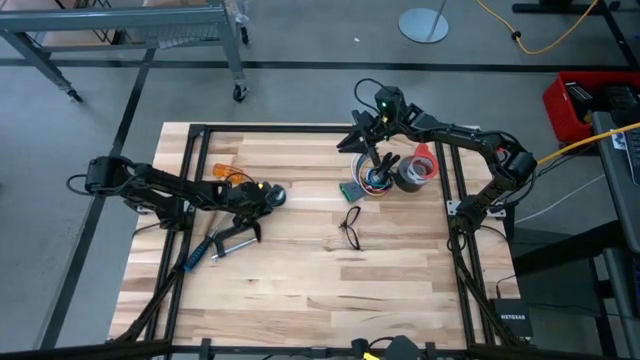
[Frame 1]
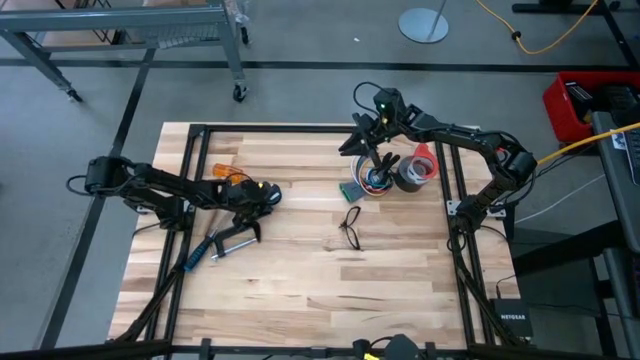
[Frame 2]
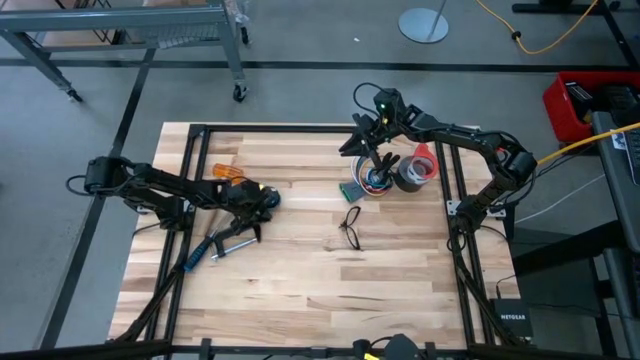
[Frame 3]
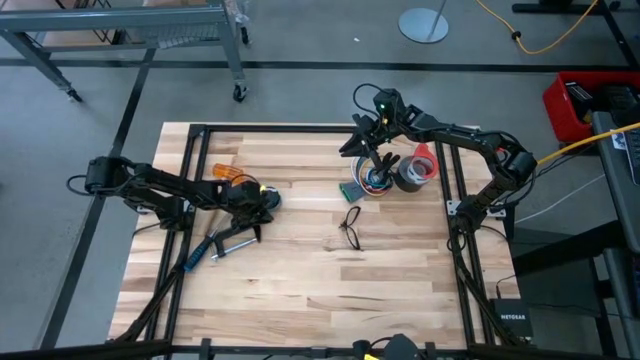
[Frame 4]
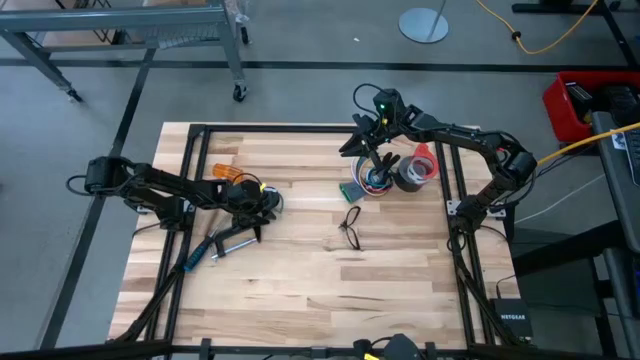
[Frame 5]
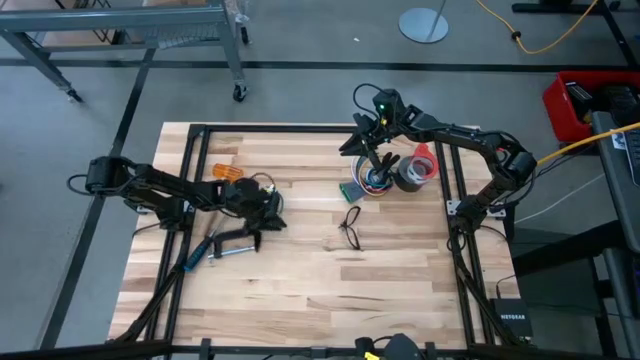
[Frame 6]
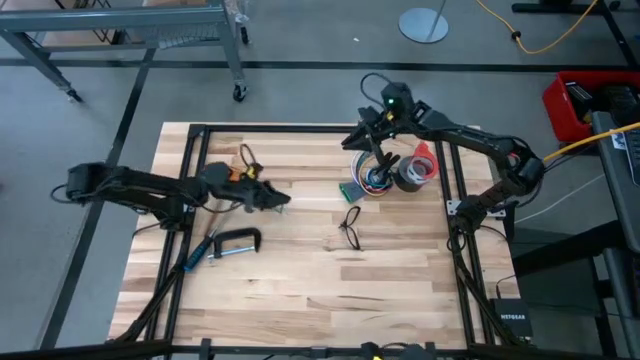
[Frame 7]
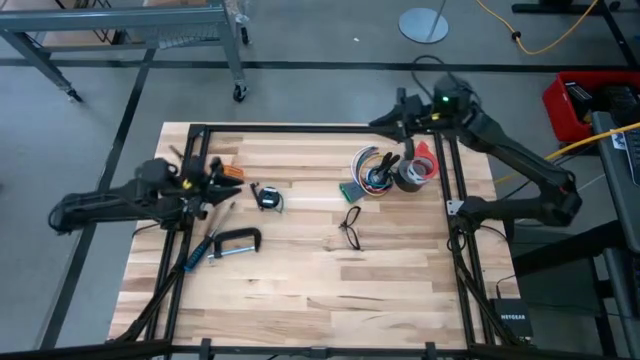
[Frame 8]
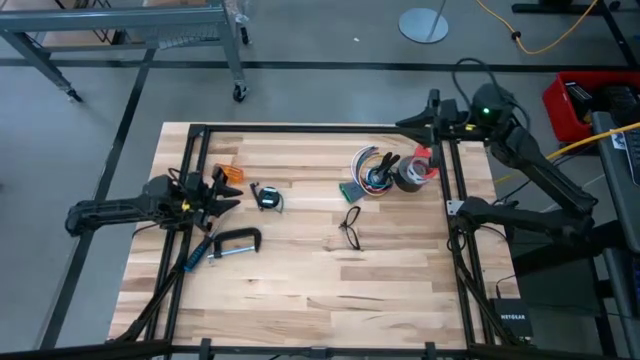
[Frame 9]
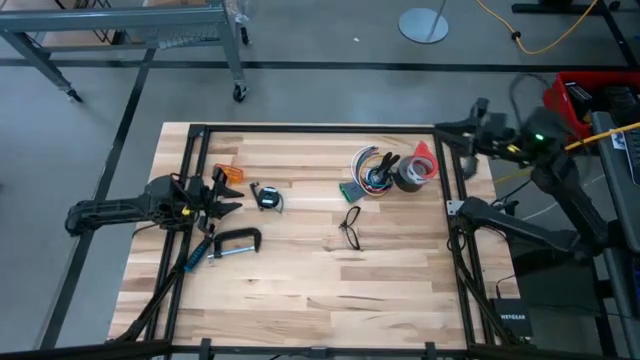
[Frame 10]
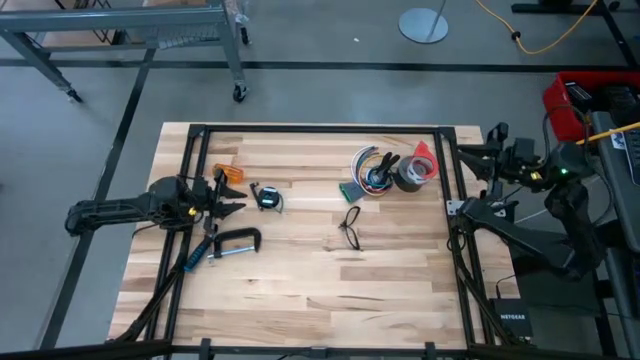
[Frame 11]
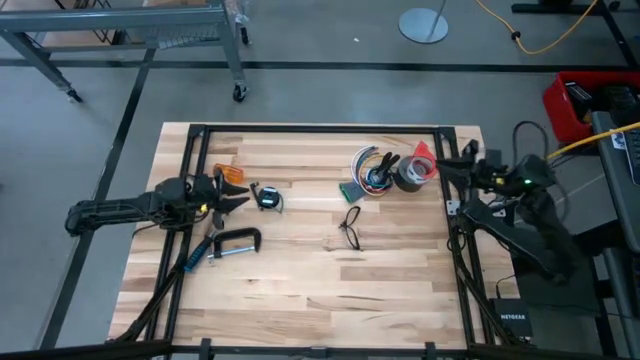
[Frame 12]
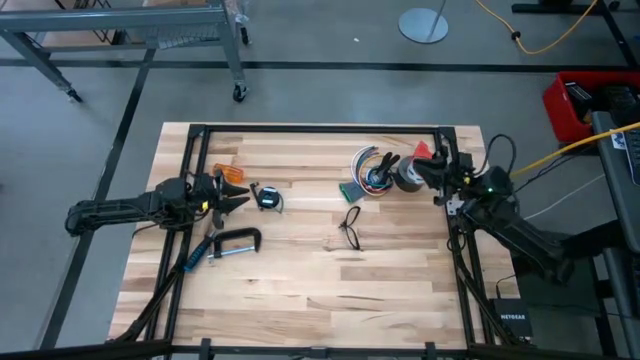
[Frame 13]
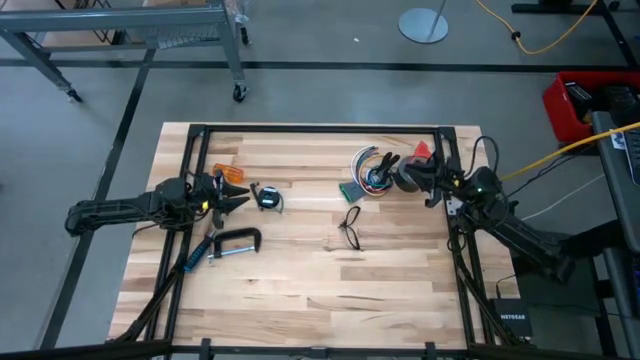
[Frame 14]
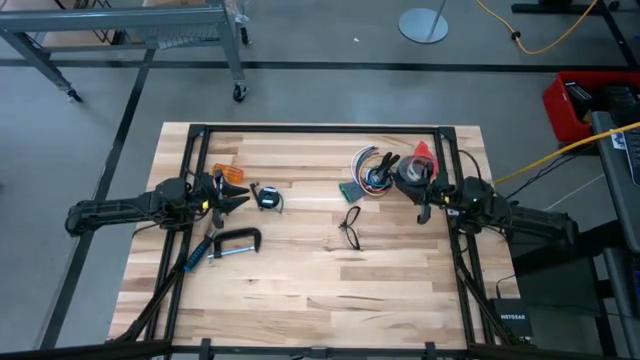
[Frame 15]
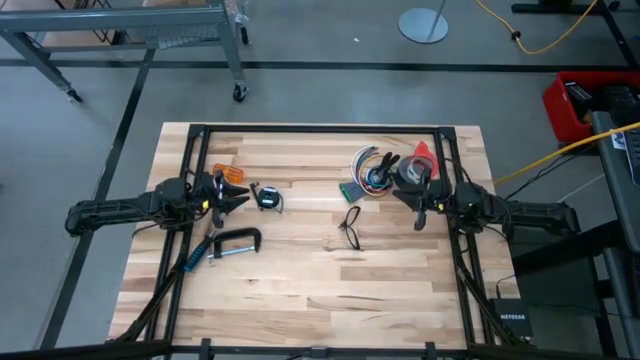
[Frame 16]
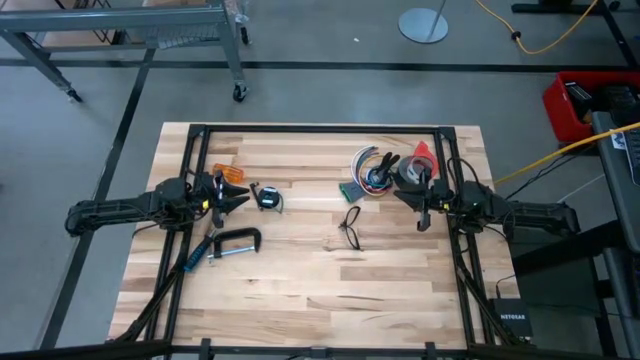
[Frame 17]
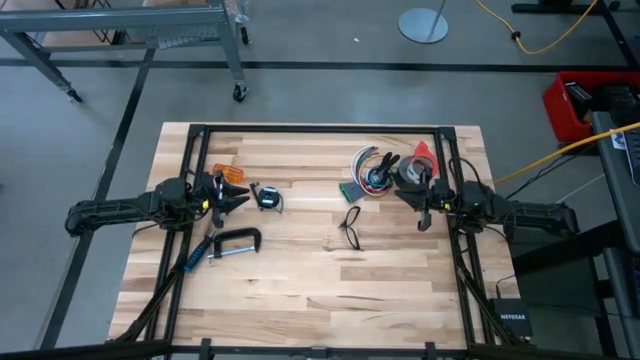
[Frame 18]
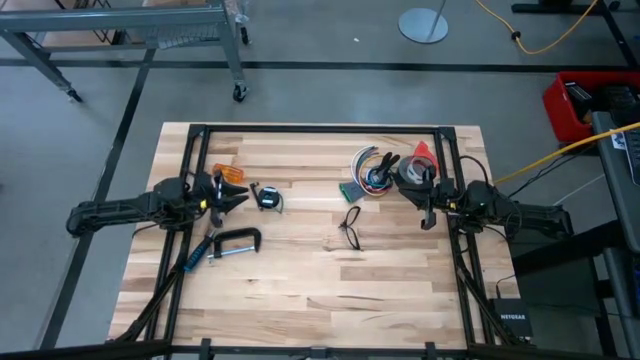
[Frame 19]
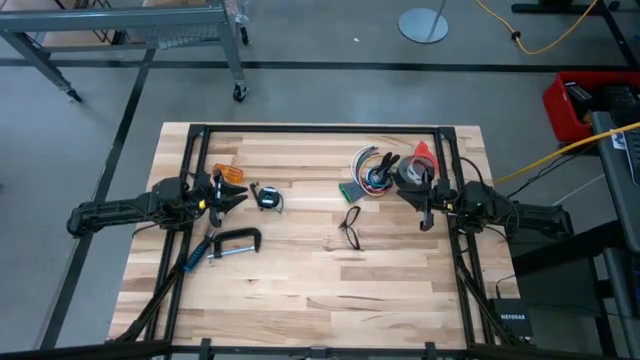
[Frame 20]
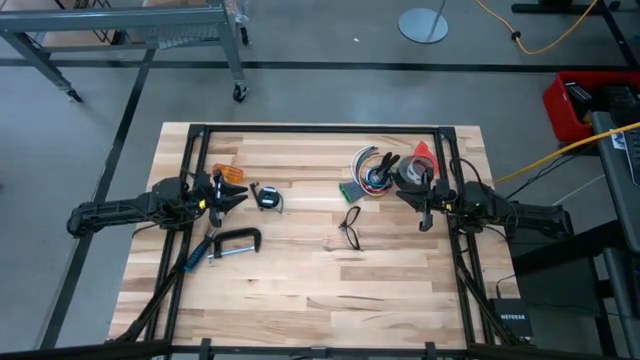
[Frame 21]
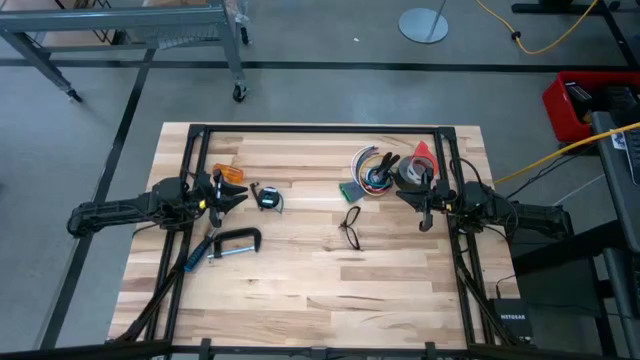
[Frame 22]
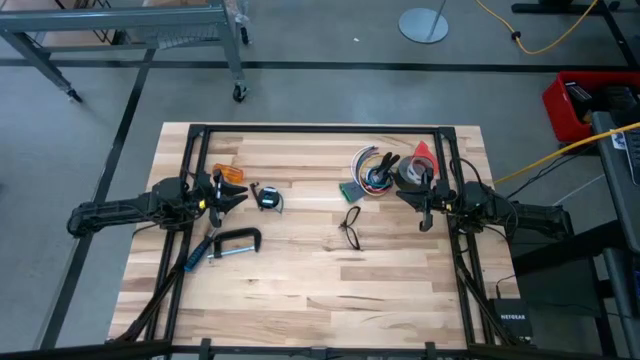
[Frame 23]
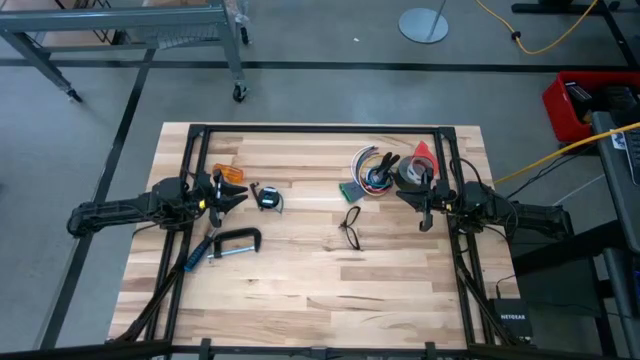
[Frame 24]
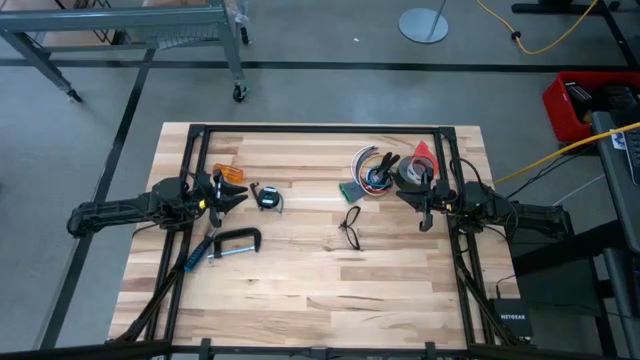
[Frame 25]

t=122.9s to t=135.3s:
Task: Coil cords
Return to Home Position

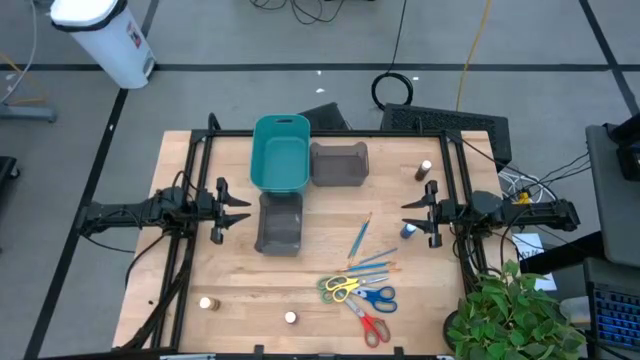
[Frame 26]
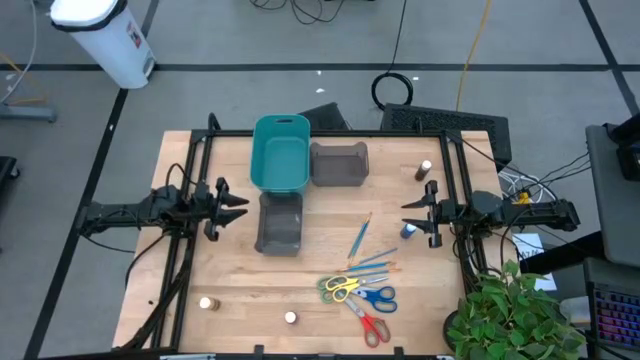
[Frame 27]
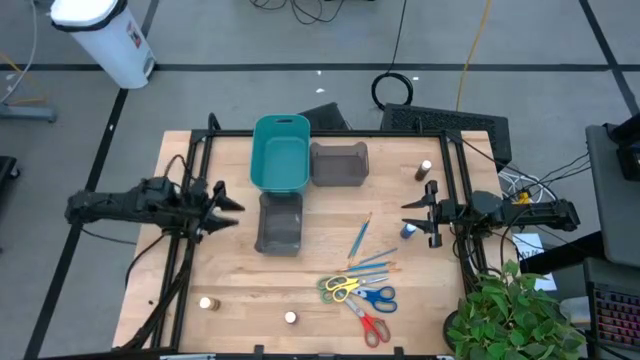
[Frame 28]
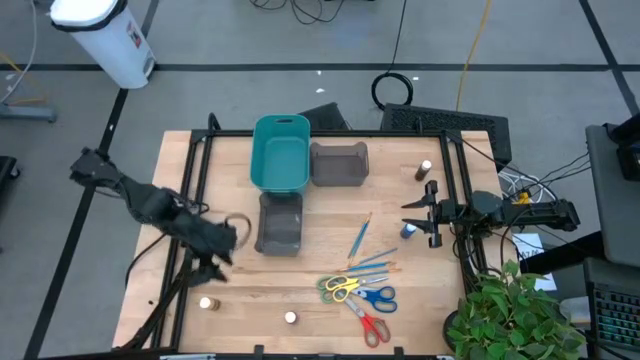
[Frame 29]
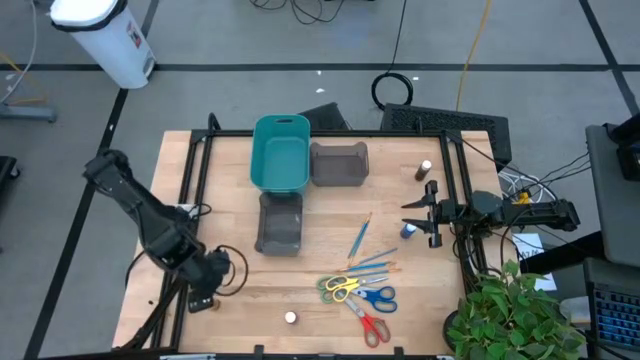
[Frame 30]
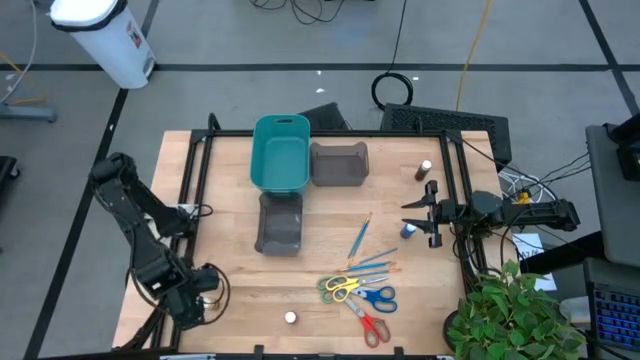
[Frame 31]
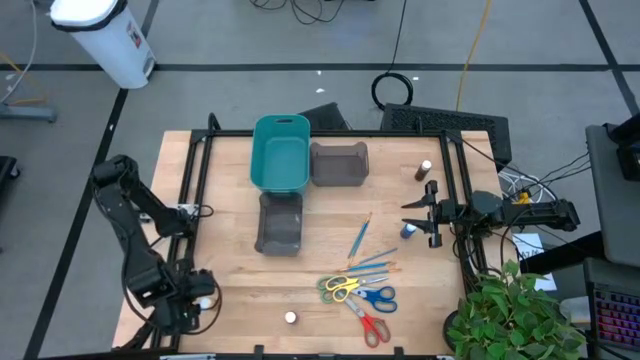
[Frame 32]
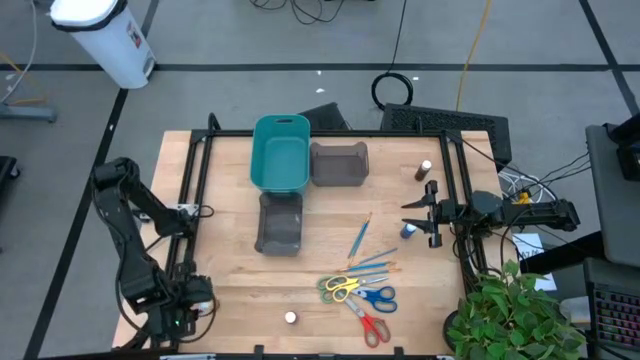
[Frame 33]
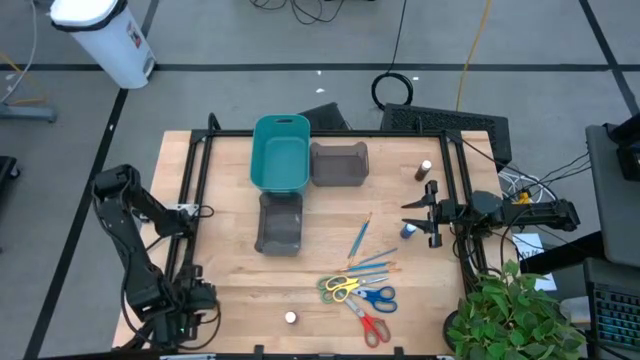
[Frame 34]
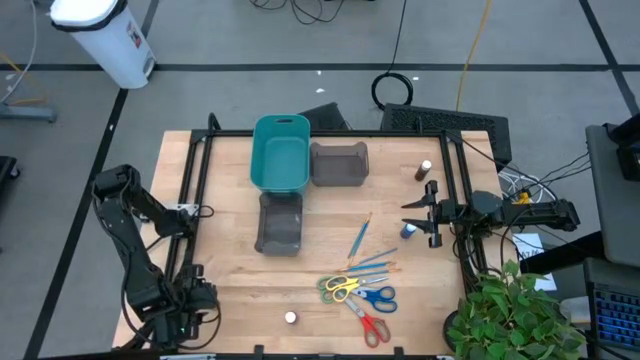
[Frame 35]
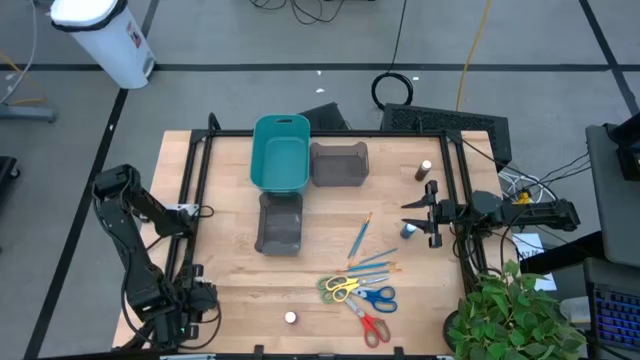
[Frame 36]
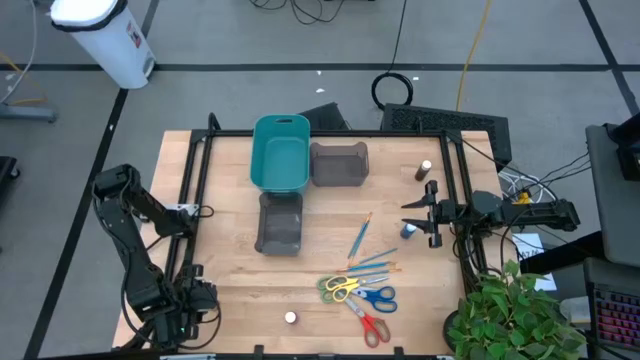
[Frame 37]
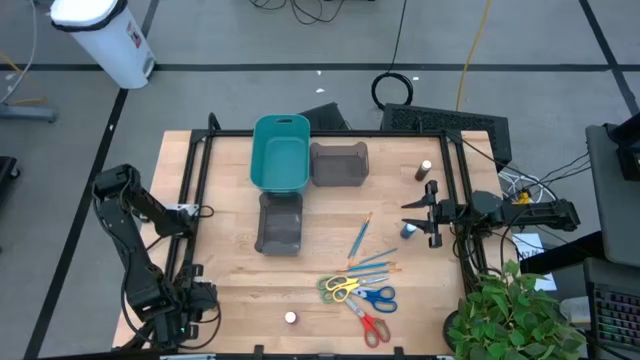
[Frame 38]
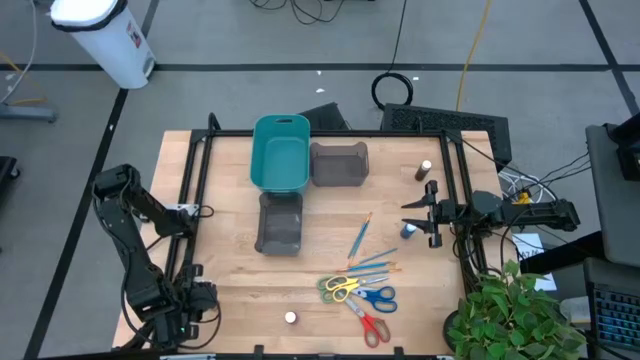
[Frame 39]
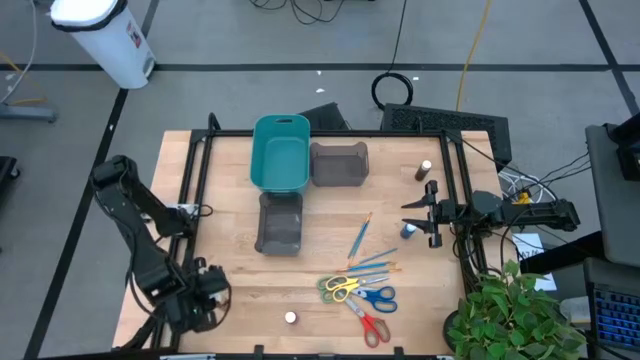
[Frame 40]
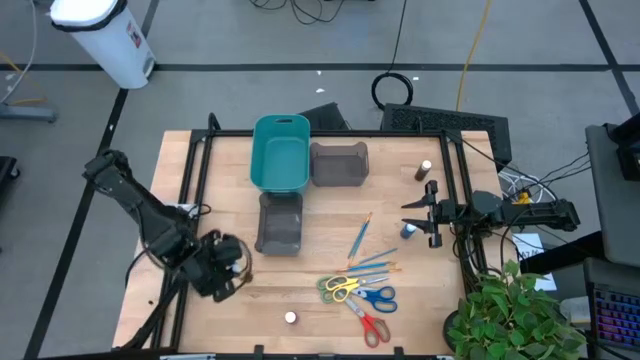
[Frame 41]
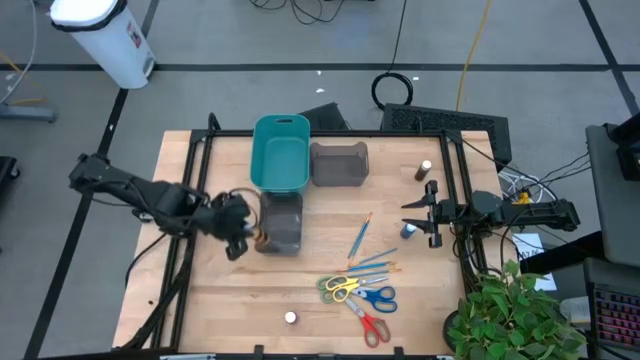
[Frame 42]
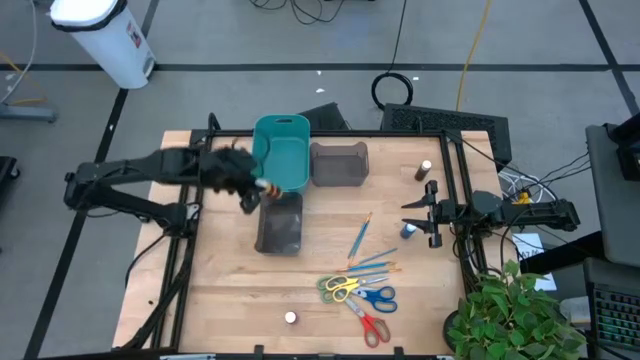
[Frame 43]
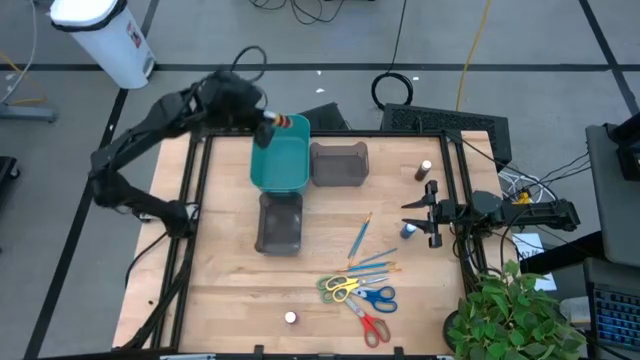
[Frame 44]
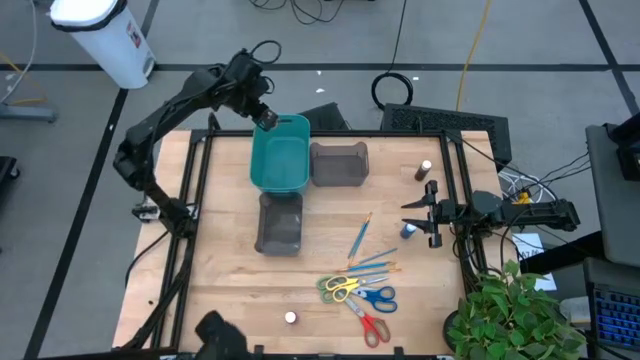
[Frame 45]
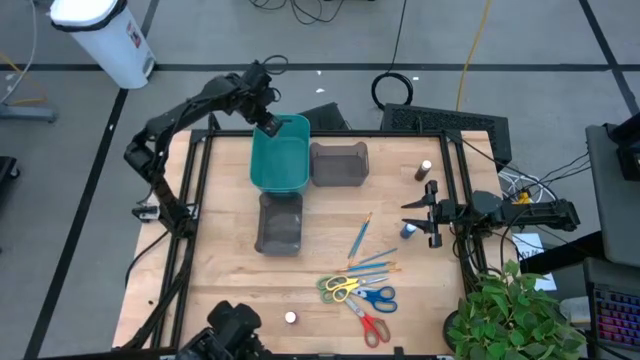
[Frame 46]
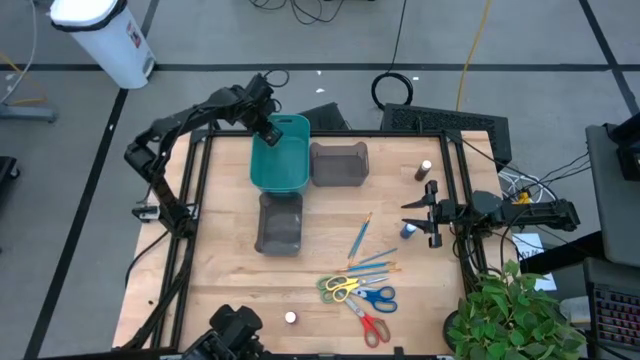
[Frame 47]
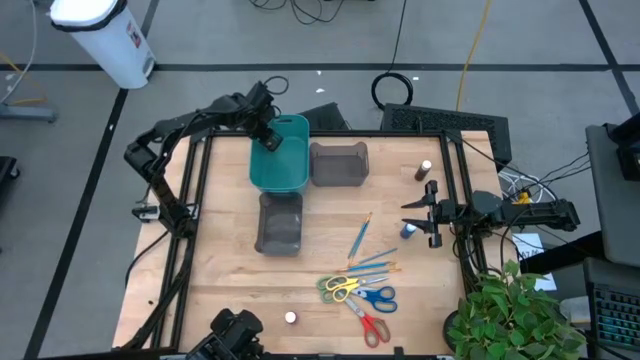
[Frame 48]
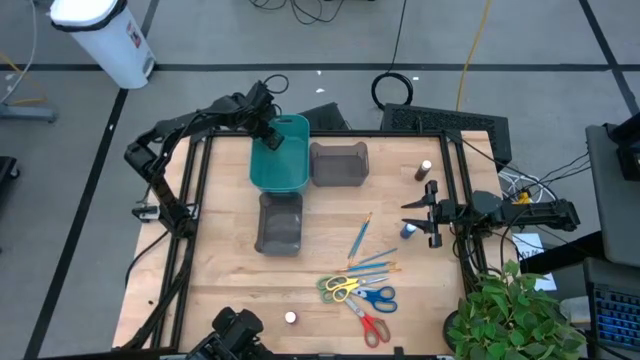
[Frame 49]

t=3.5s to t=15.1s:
Task: Pick & Place Paint Supplies
Put the yellow paint bottle into the blue bin
